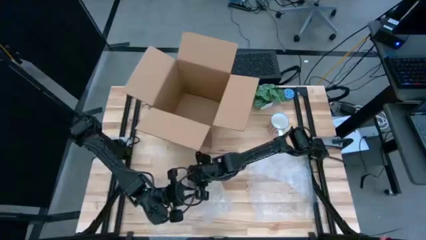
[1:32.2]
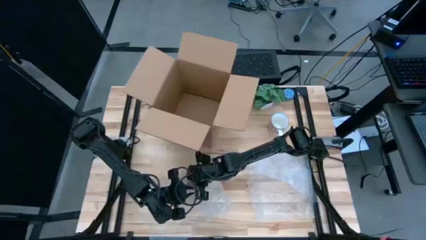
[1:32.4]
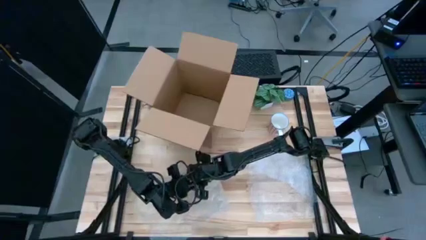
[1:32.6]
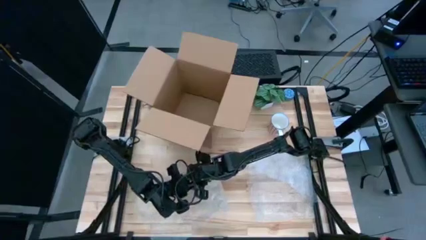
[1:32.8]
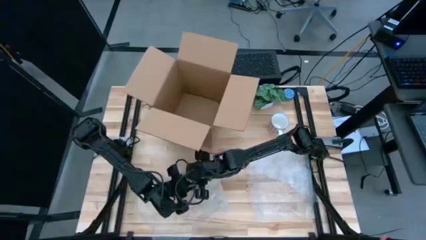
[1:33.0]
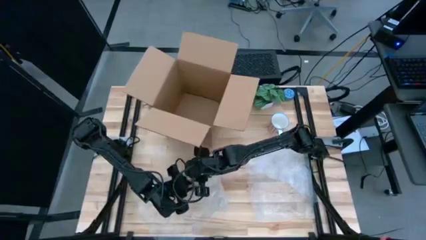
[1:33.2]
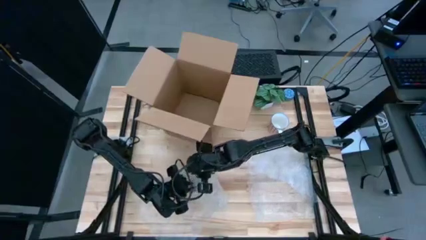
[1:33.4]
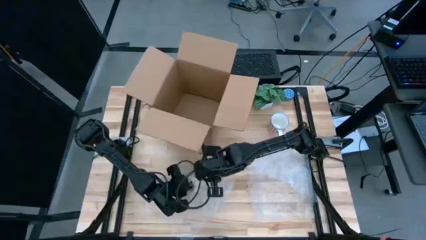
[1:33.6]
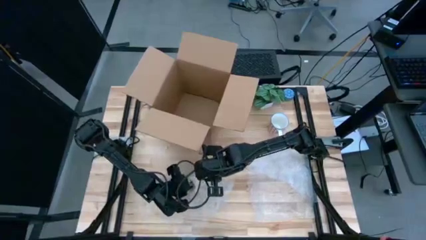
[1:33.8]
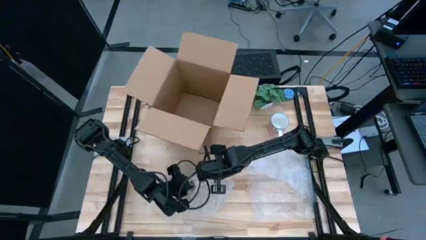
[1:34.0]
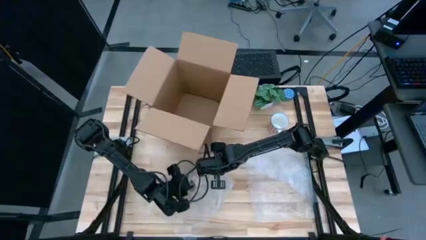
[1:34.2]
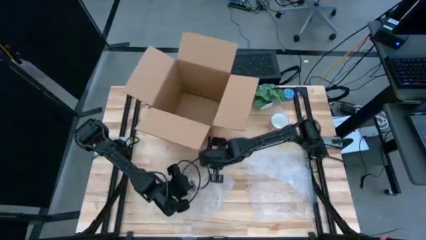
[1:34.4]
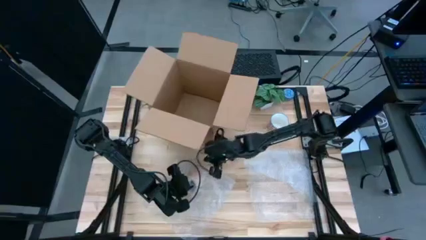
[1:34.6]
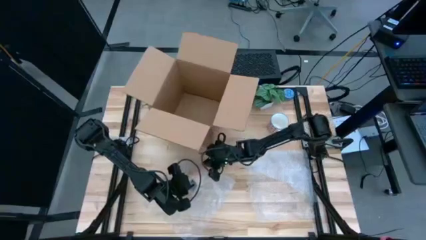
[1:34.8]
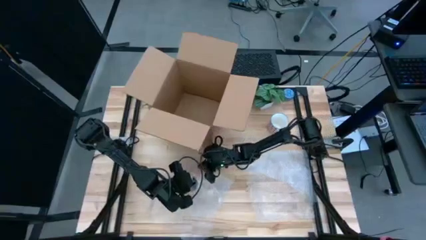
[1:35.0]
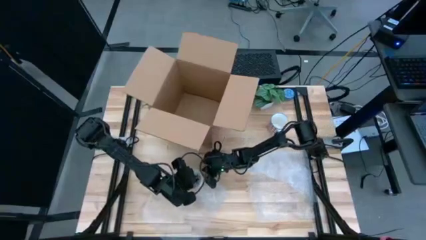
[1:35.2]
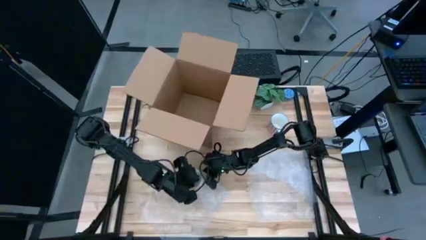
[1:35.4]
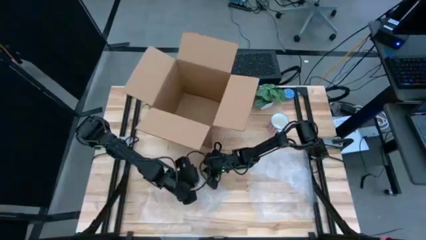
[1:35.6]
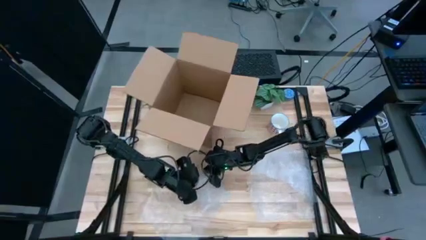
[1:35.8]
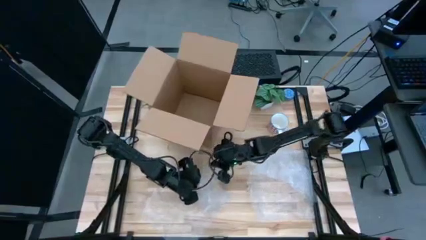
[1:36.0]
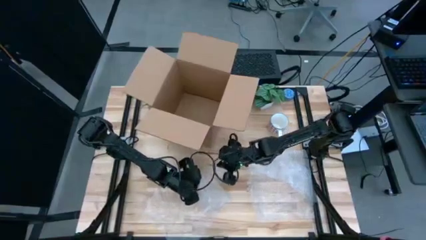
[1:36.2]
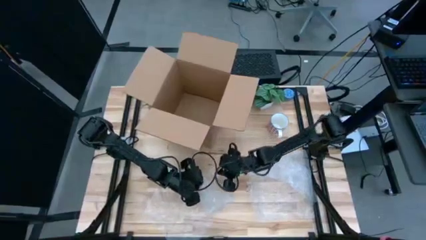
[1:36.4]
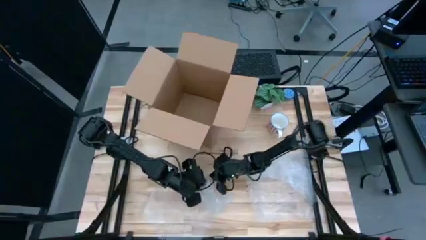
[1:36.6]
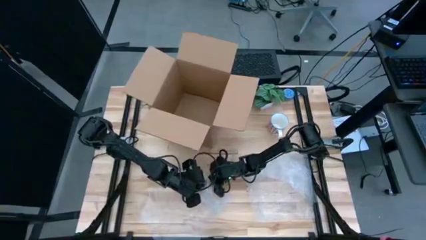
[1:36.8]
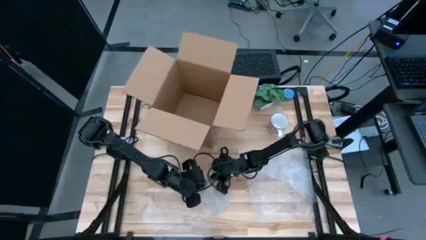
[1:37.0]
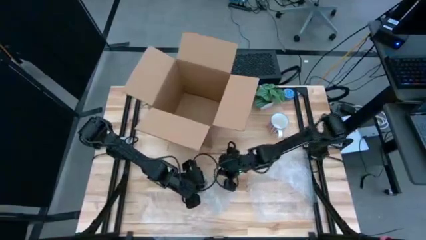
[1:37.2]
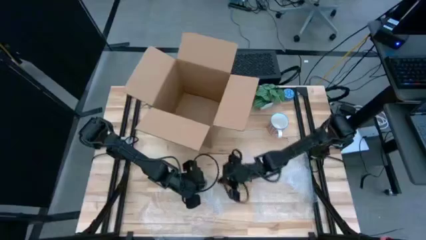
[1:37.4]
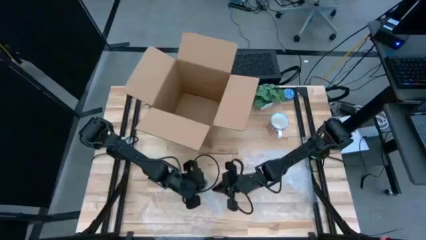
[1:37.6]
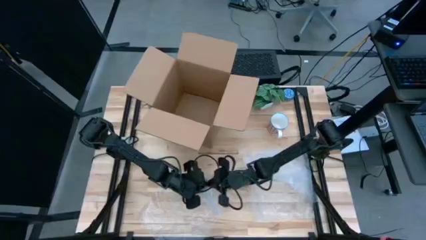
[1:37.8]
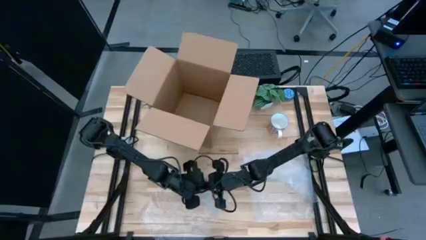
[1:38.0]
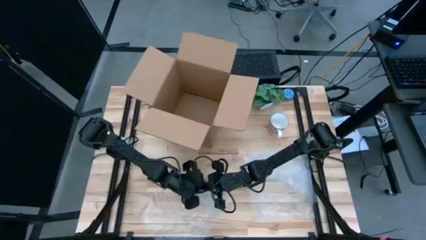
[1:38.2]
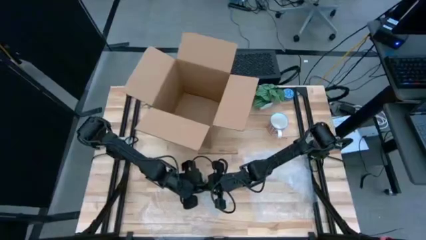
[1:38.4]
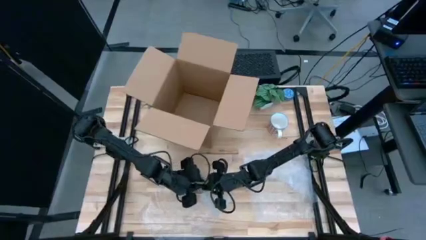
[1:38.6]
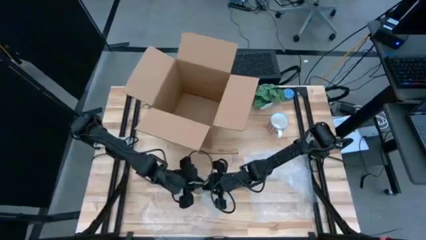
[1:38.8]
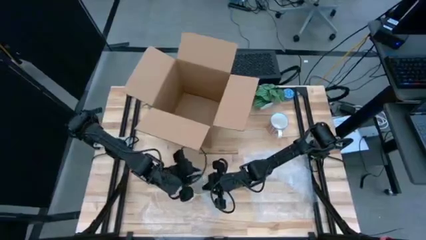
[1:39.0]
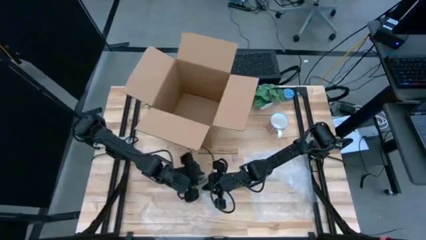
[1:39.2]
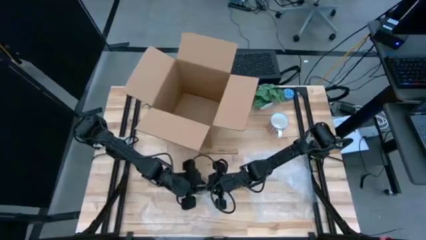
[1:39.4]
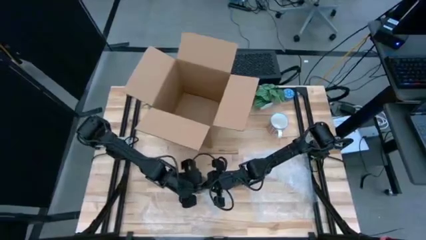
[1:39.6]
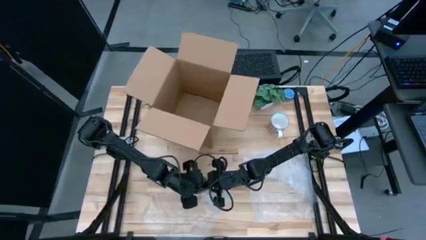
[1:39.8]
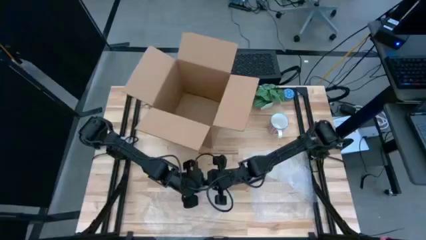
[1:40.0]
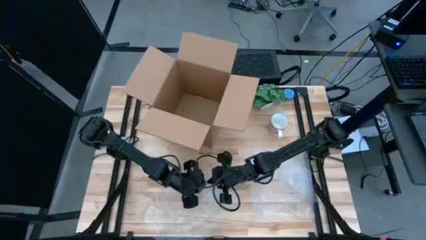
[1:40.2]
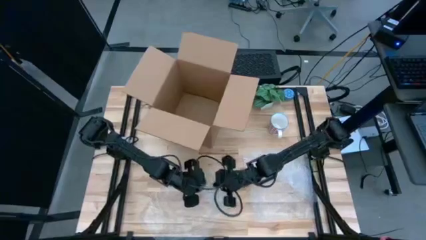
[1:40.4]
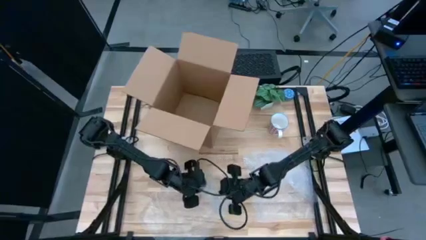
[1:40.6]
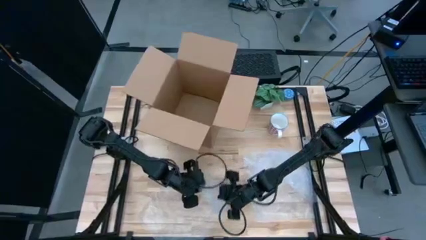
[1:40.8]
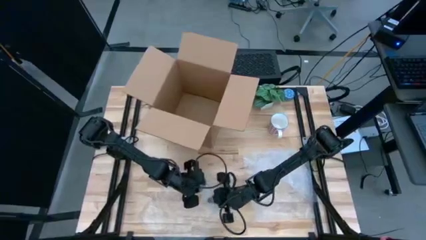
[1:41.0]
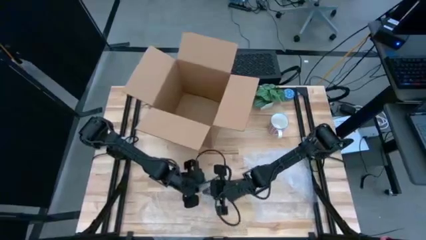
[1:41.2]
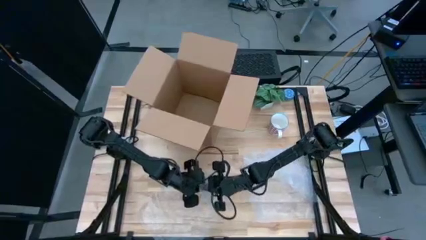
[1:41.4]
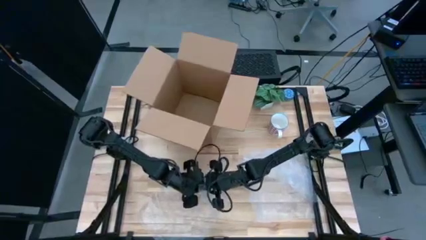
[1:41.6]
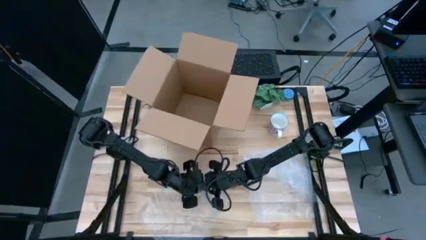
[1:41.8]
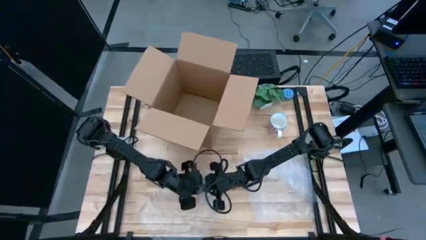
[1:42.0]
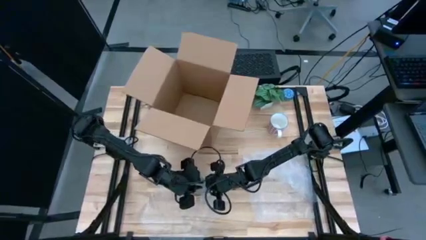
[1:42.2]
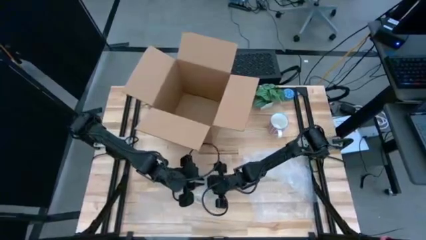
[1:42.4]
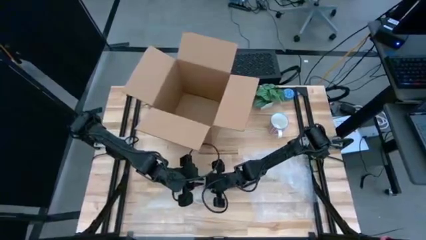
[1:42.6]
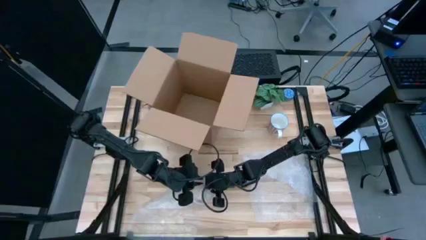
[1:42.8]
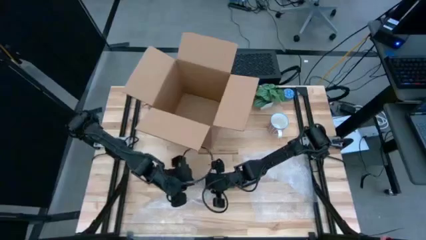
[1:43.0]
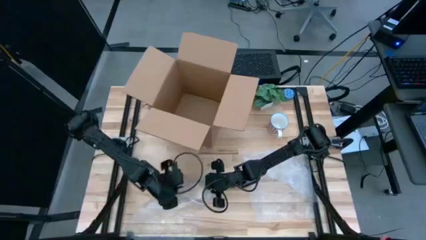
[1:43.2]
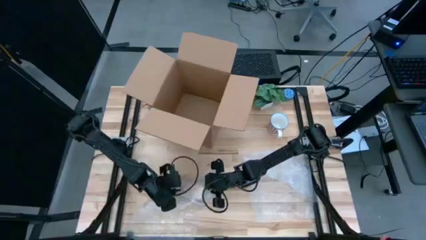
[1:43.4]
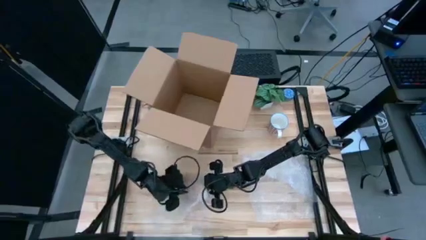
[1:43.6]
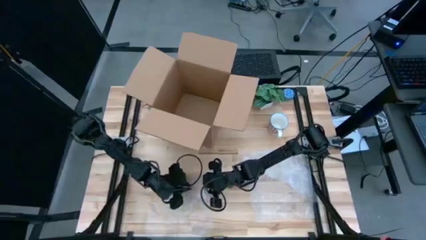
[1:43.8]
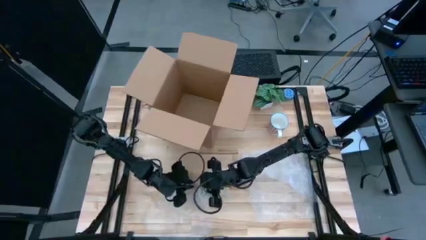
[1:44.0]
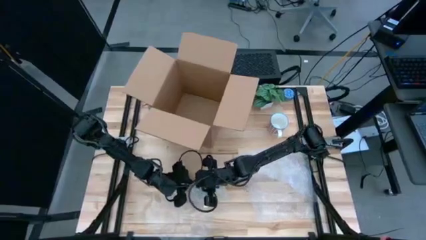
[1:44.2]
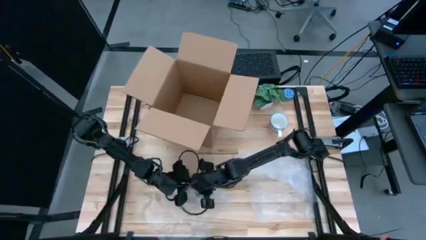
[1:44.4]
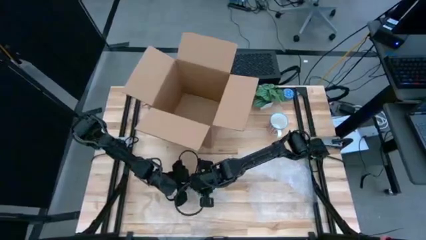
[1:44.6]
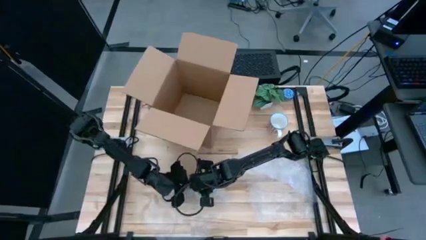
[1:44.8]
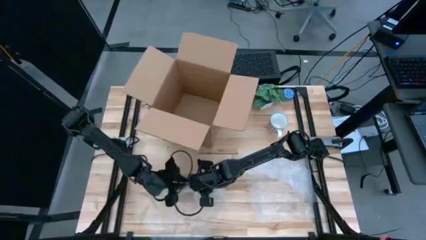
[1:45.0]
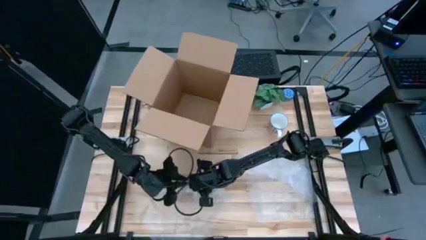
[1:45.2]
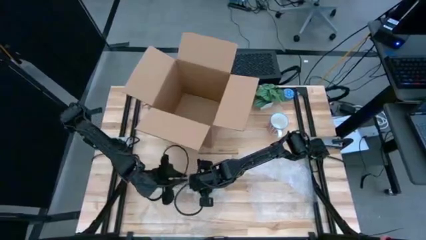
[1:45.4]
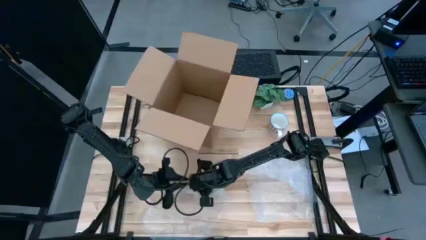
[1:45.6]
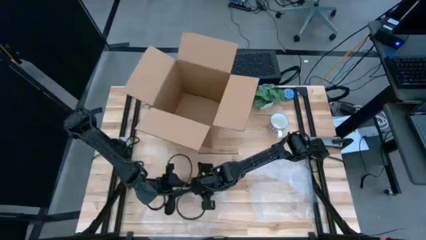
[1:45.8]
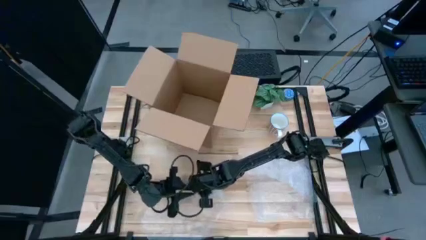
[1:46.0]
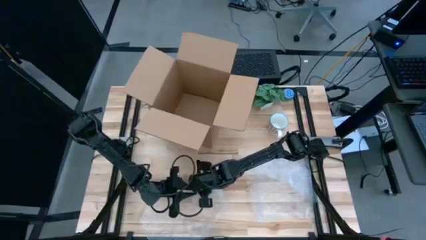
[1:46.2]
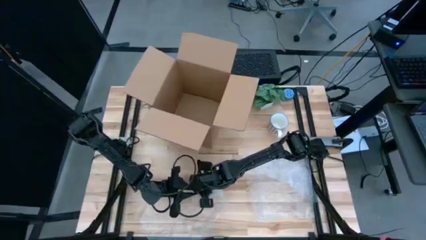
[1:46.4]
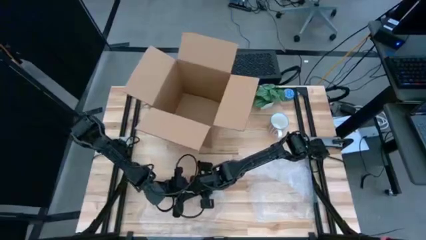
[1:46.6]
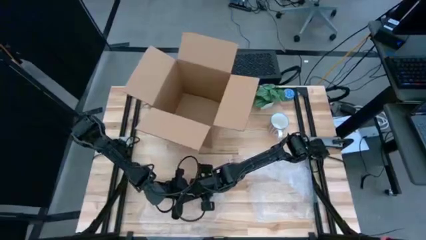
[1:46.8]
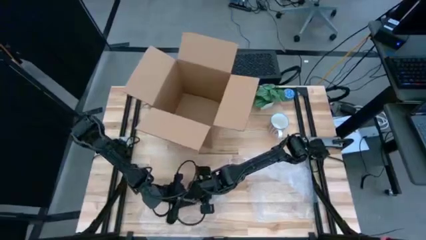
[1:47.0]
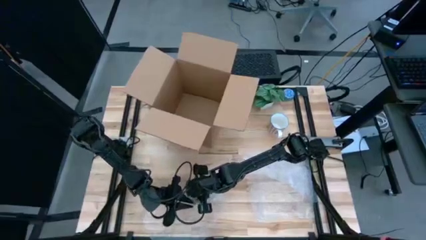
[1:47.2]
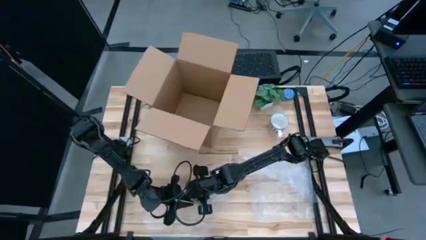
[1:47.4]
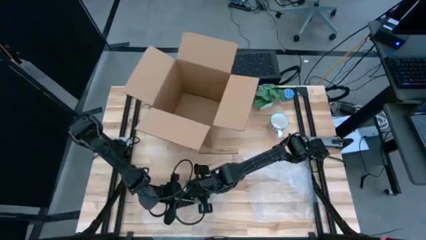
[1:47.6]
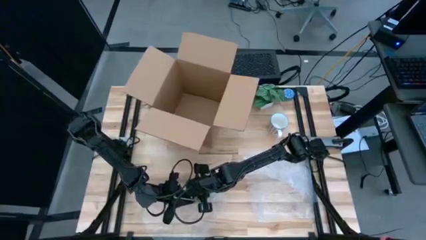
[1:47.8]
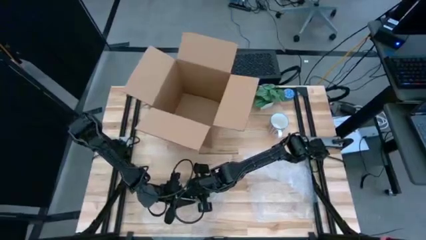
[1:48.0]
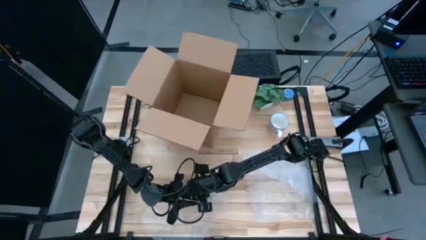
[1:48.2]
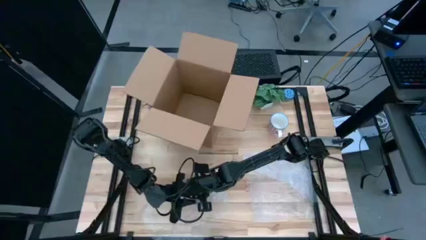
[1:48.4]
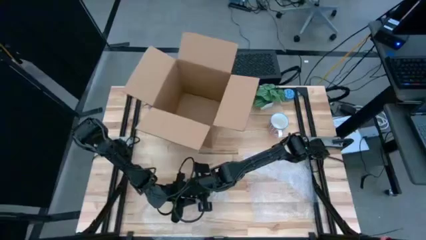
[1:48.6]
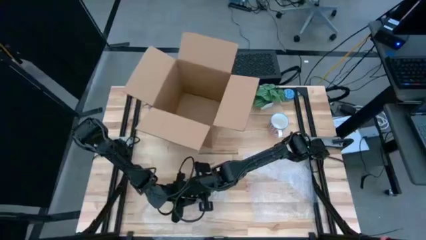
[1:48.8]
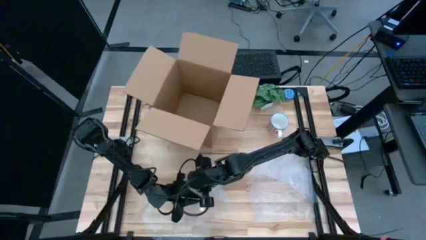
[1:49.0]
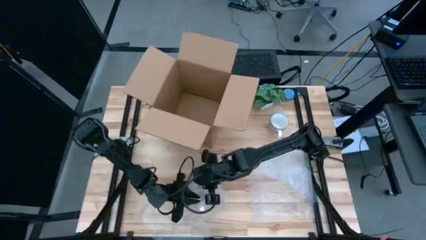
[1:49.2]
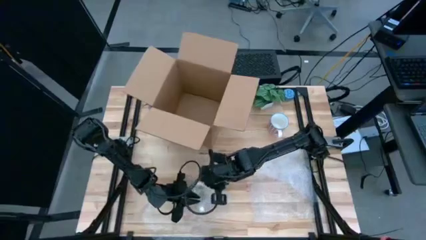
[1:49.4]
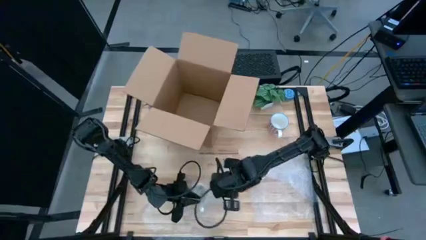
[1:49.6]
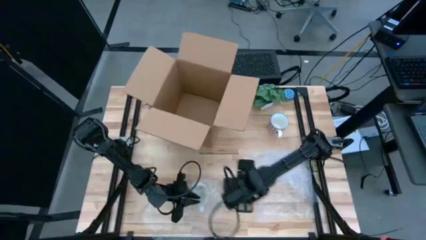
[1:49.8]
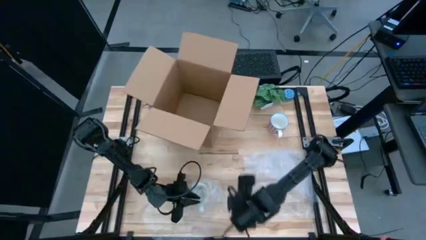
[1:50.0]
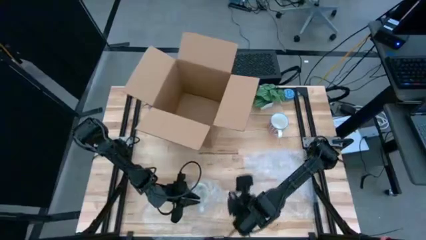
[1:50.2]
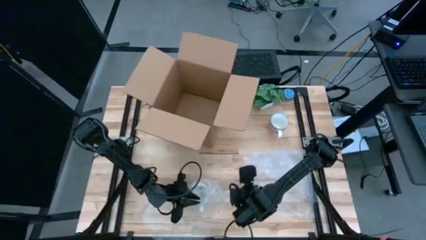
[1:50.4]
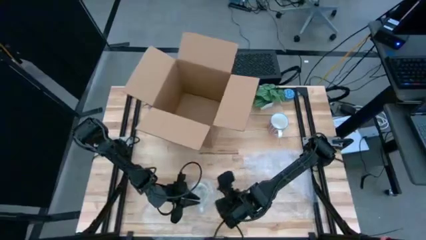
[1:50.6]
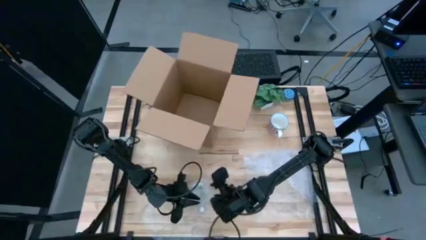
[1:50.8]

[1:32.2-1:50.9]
Task: wrap mug
Wrap the yellow mug with bubble wrap
